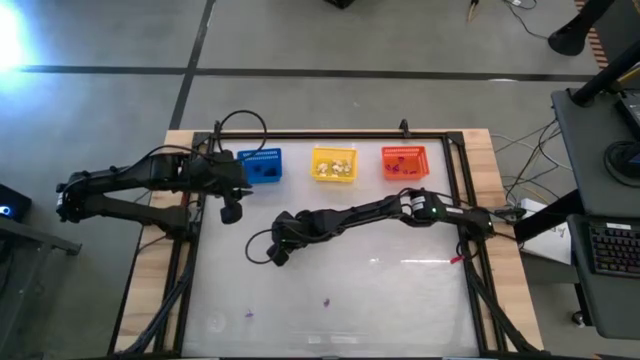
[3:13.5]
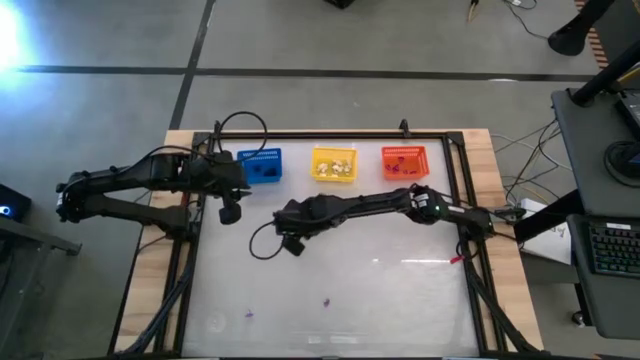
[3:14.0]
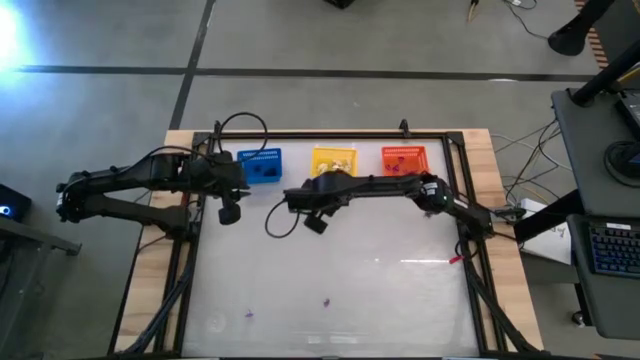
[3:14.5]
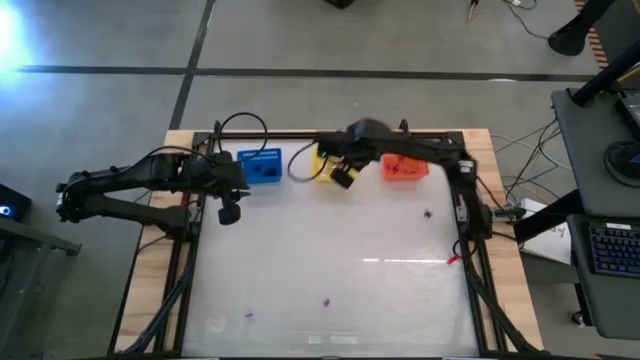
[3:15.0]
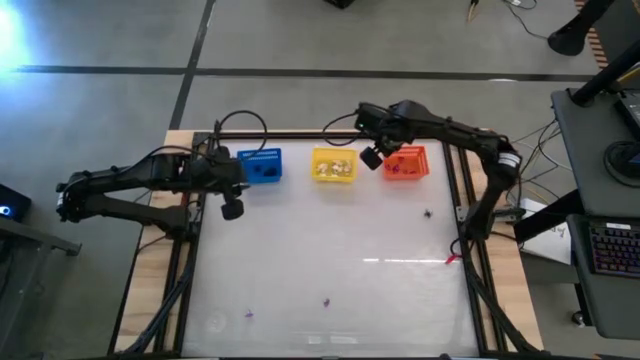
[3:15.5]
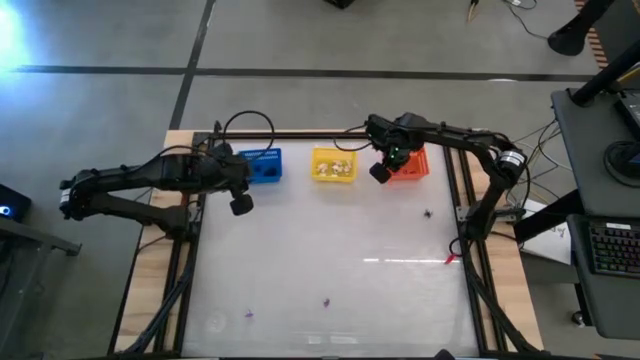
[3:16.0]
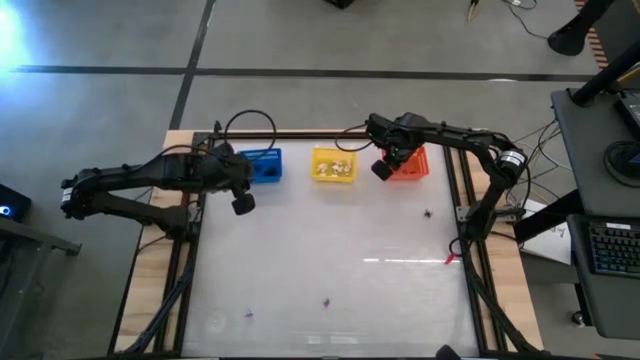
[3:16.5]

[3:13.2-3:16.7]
Task: Sort Halloween decoration
Put the purple hat toy into the orange bin

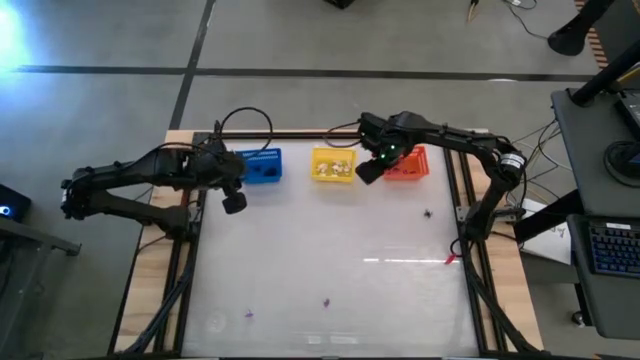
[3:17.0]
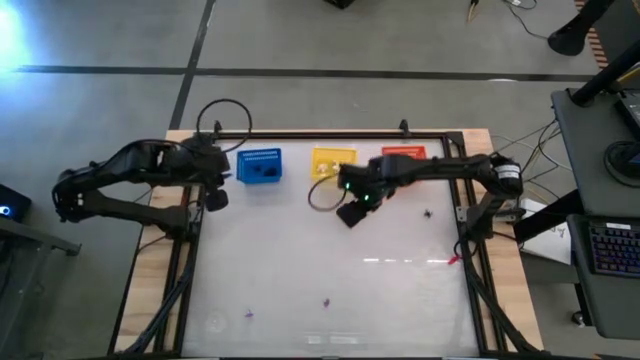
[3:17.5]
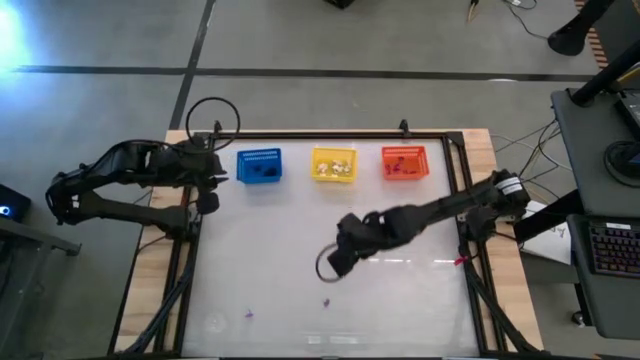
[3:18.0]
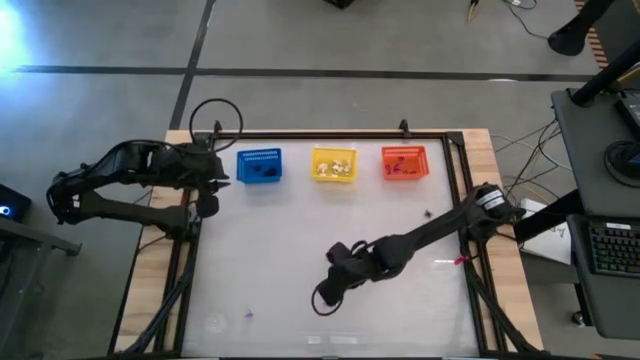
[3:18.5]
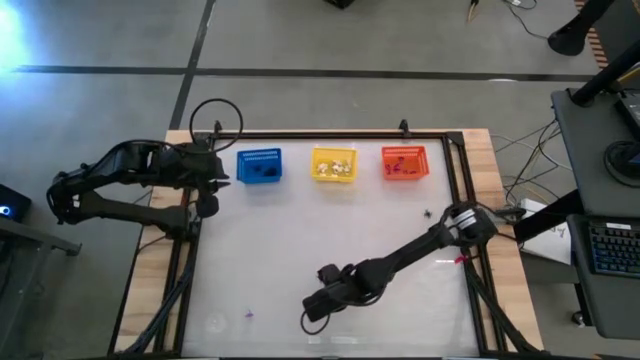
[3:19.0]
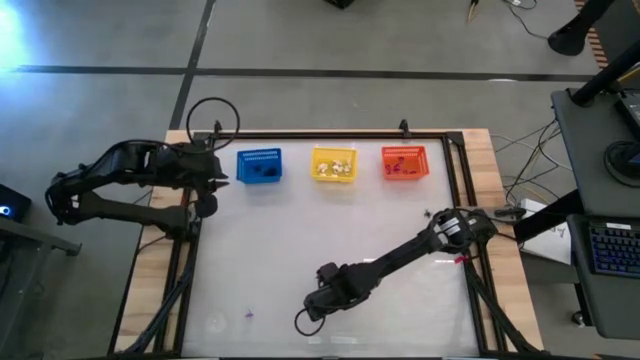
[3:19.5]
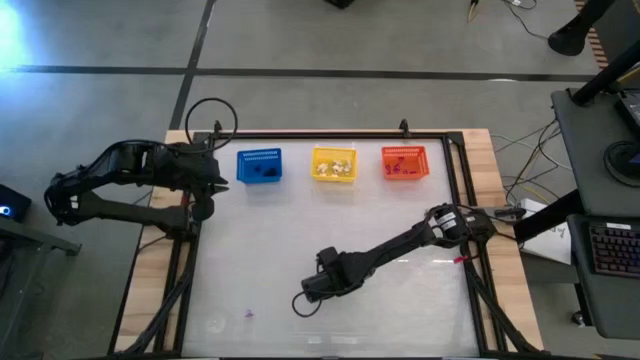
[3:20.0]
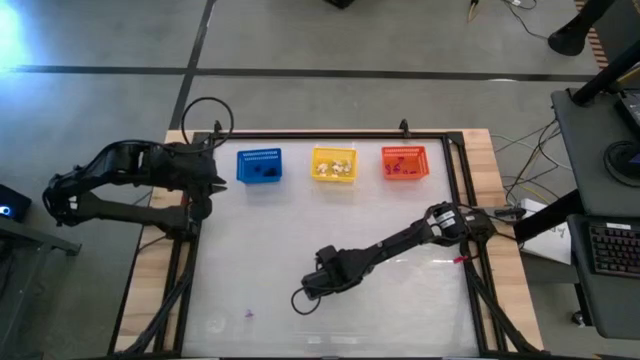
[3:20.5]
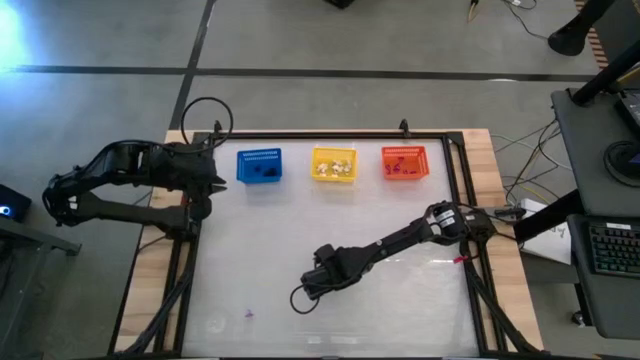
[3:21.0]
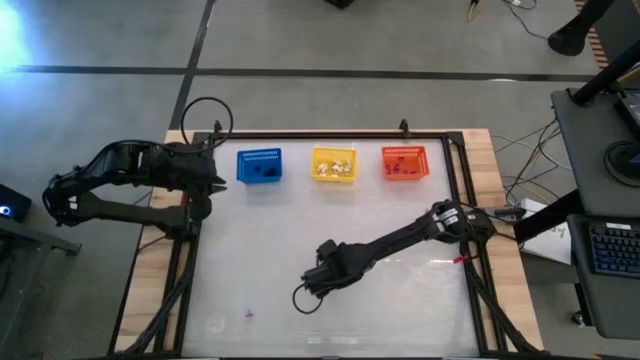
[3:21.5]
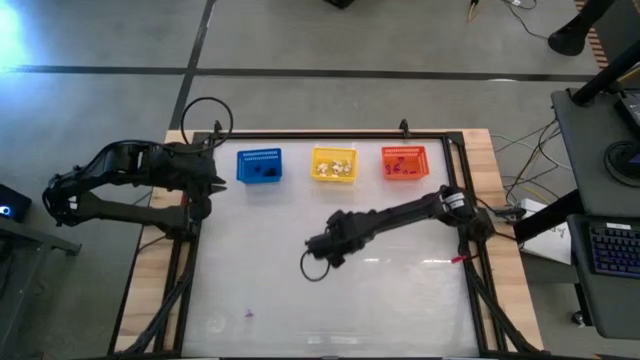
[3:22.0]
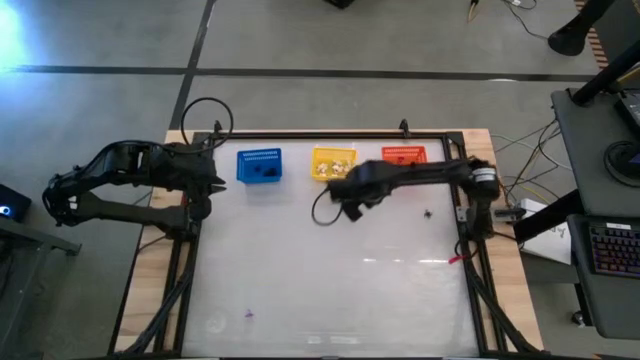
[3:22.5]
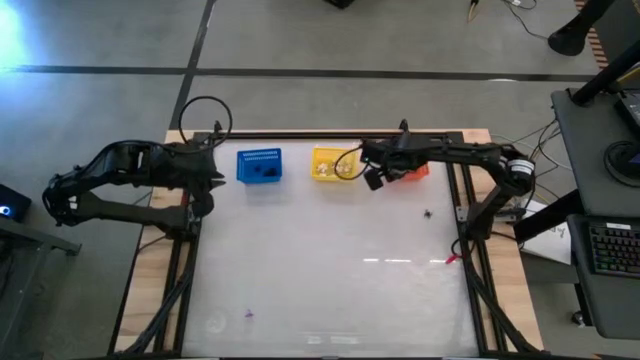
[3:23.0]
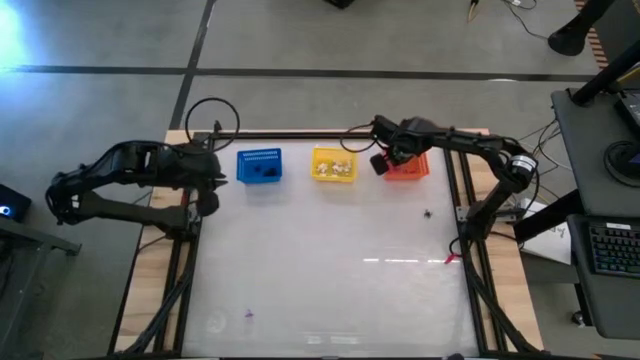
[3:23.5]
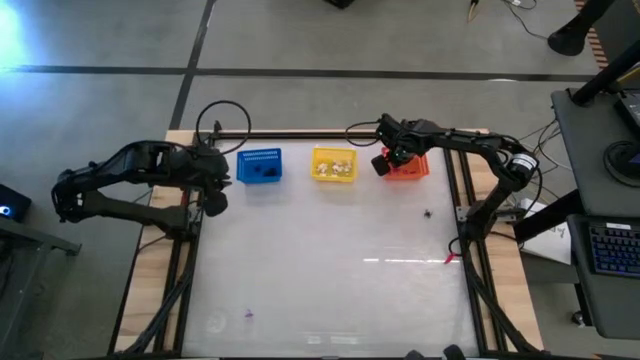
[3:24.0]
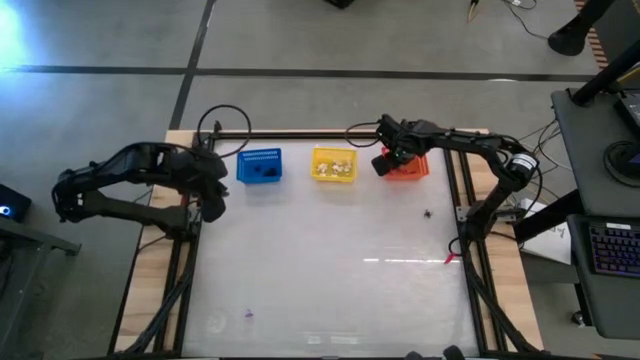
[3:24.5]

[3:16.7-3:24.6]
Put the purple hat toy into the orange bin

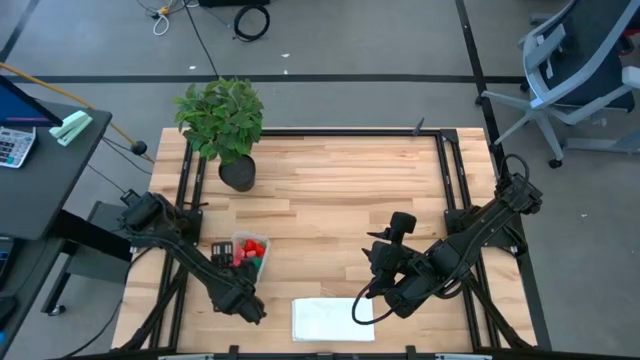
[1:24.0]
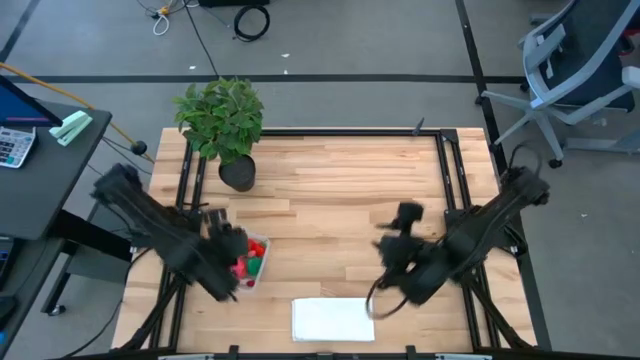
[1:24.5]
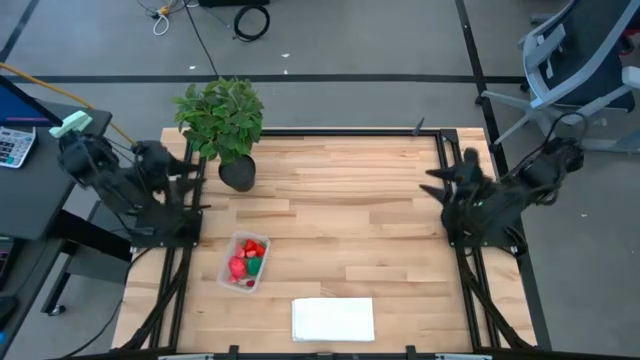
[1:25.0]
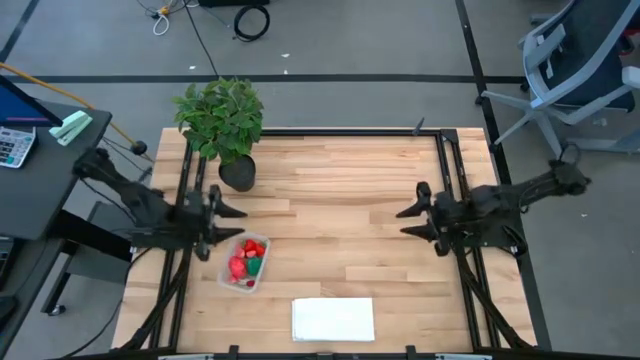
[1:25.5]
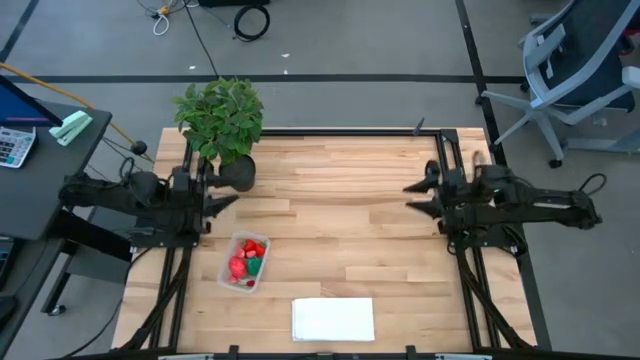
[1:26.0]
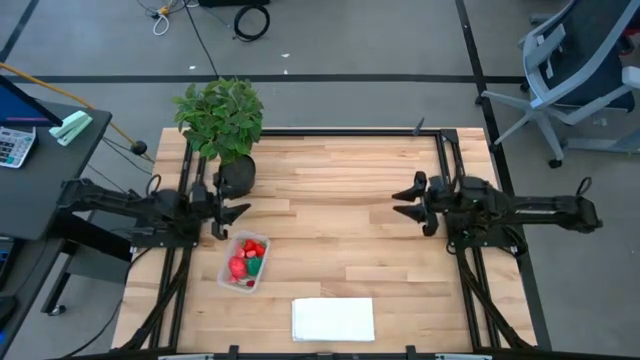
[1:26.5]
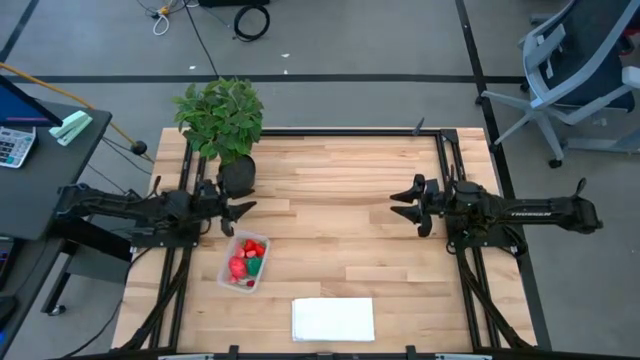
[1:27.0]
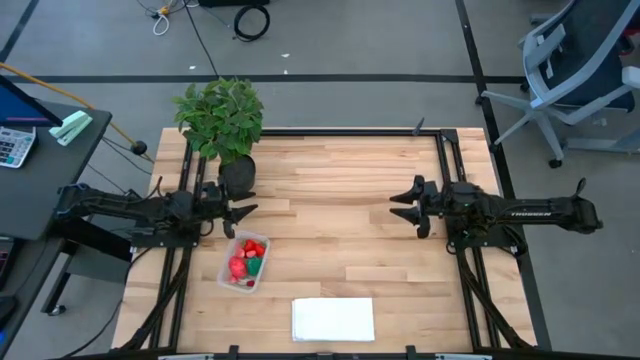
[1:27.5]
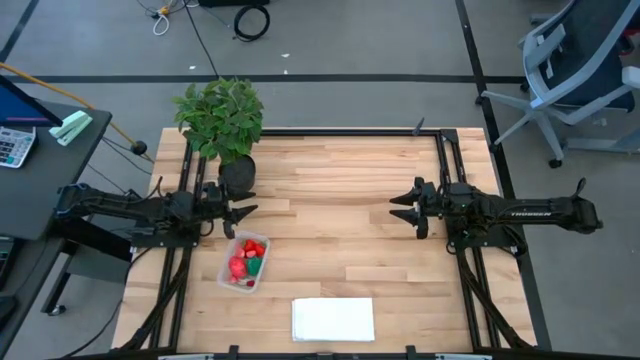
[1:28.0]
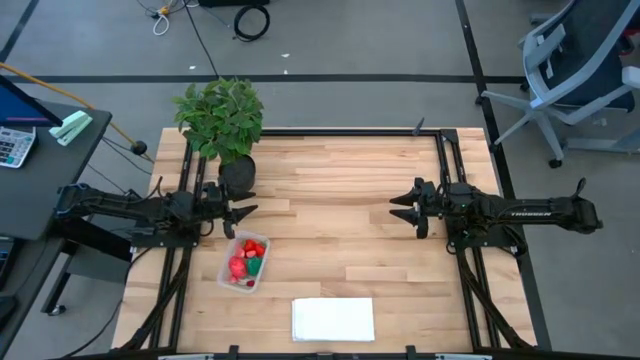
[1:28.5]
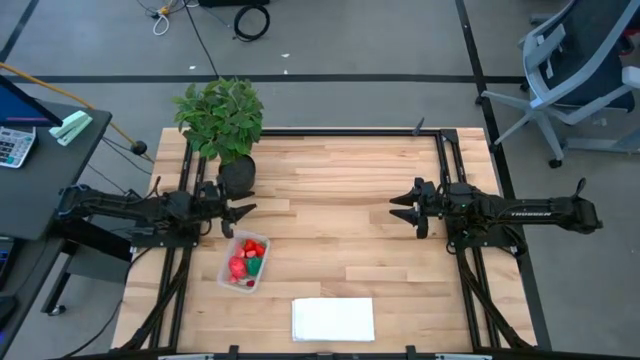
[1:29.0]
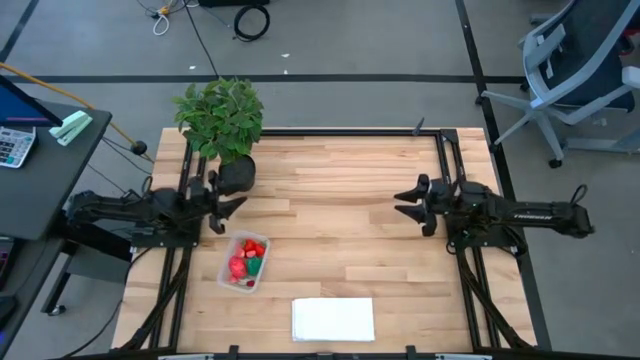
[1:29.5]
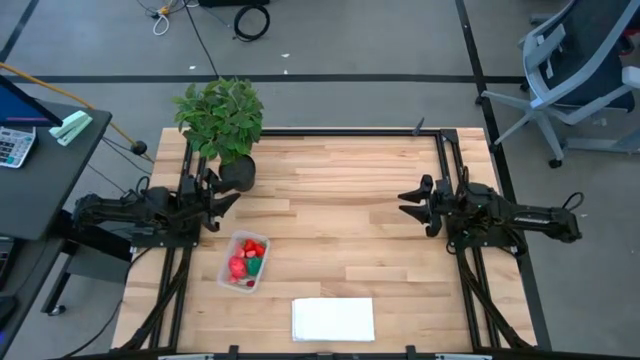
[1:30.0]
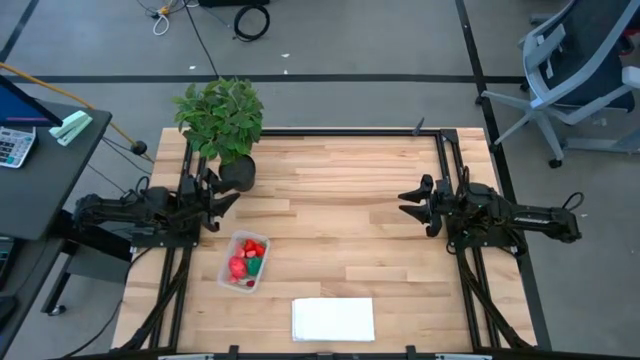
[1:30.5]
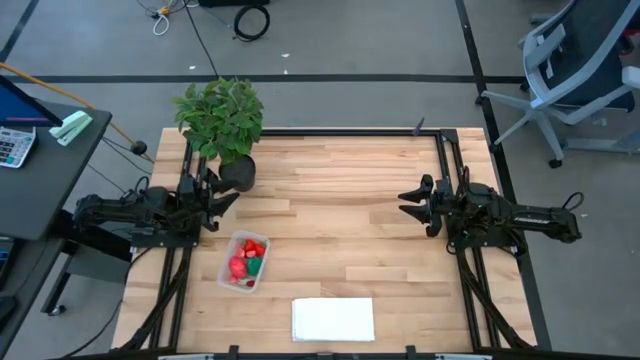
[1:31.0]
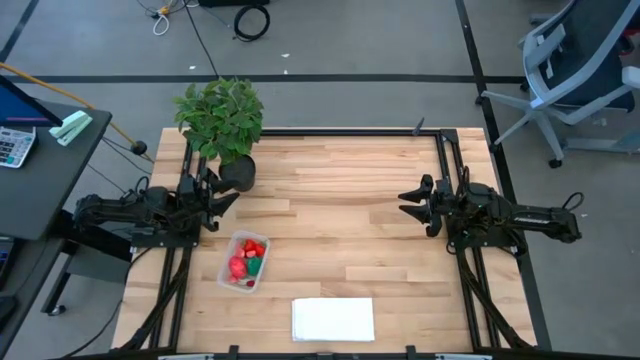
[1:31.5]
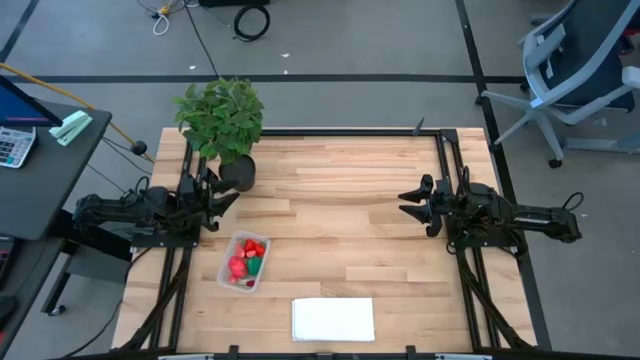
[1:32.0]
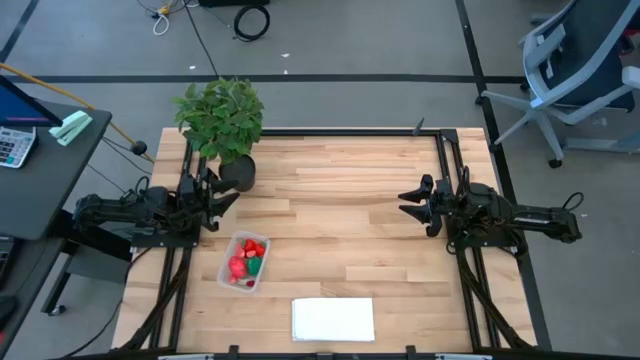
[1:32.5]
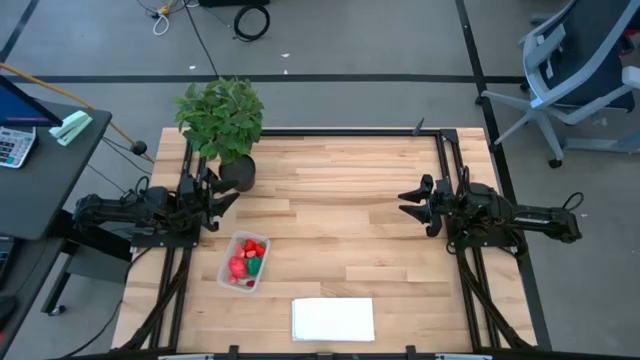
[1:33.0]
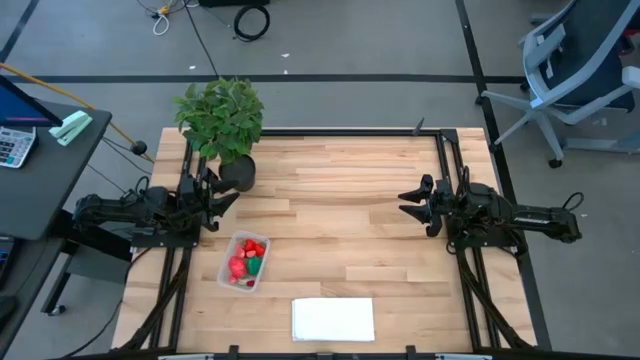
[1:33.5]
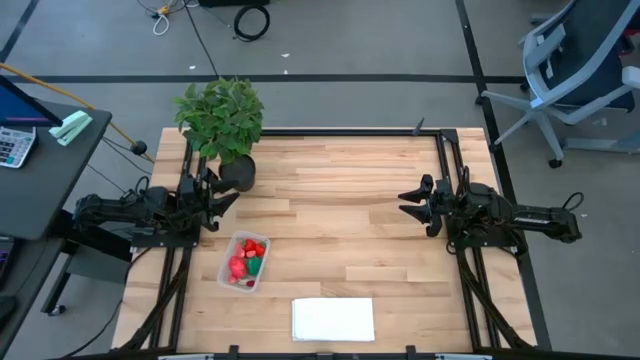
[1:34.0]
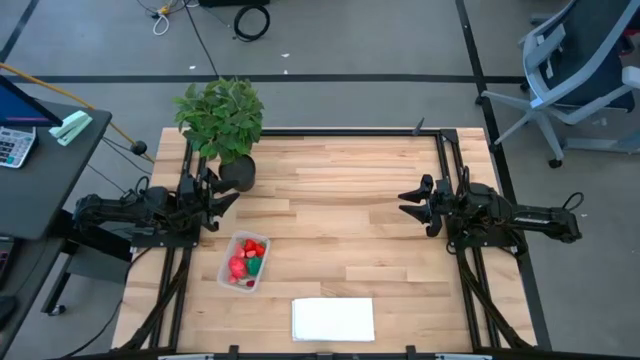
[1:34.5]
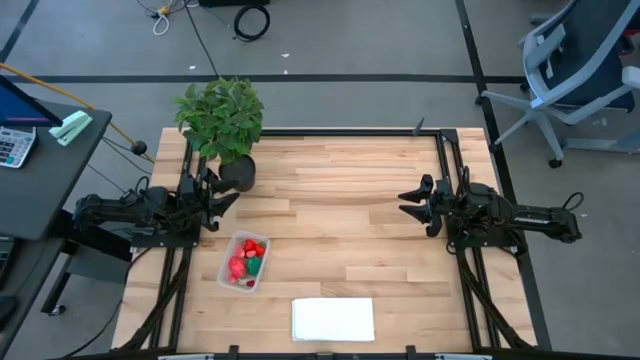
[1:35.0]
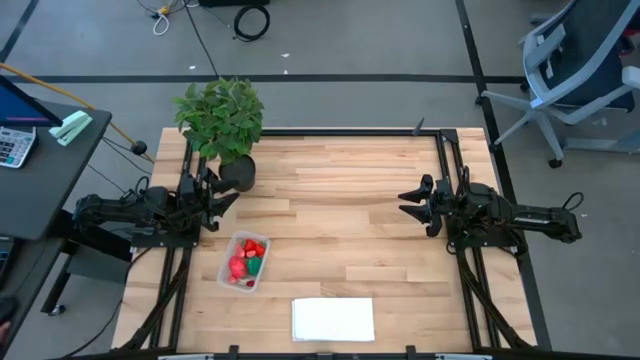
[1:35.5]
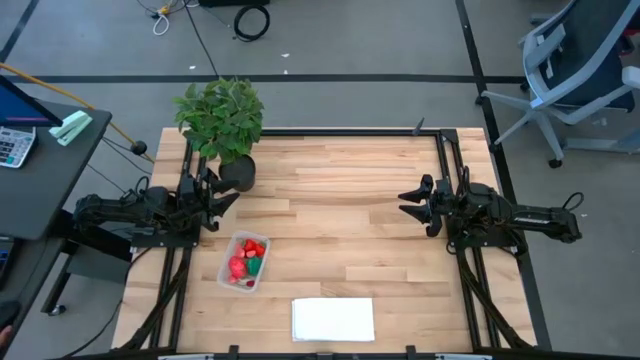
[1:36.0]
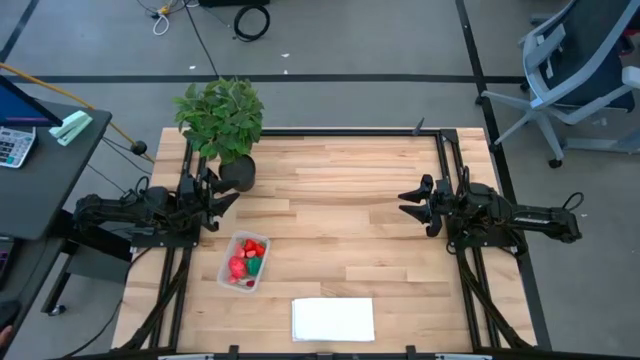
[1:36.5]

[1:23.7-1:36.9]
Task: Pick and placing Produce into tupperware
Return to Home Position
